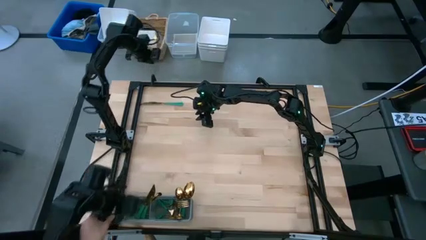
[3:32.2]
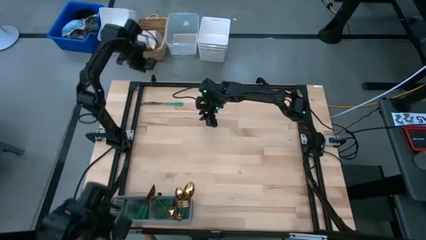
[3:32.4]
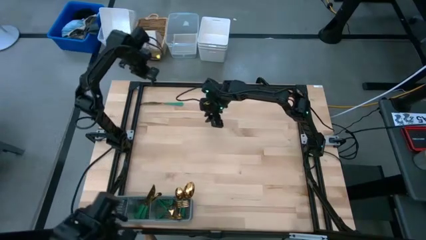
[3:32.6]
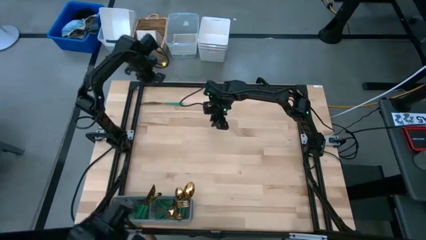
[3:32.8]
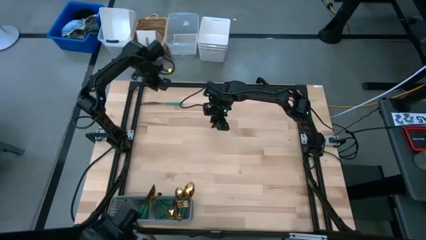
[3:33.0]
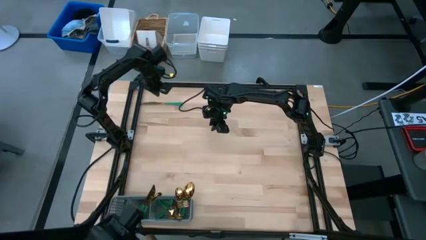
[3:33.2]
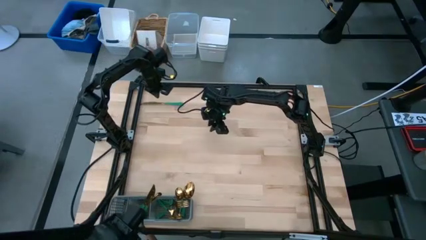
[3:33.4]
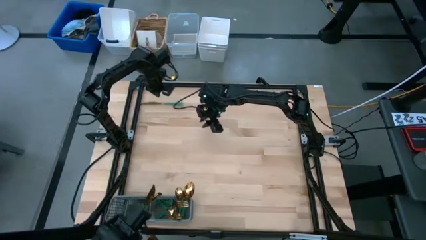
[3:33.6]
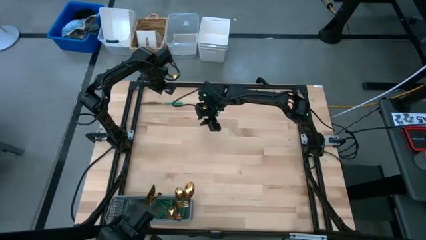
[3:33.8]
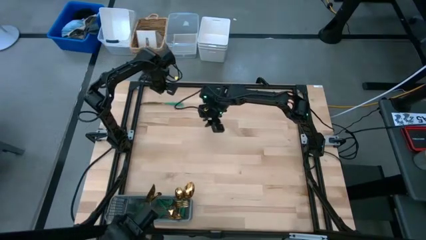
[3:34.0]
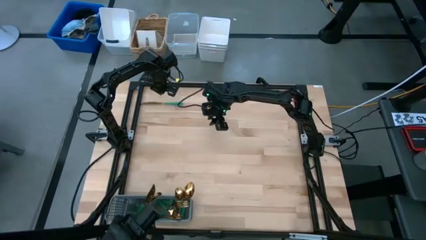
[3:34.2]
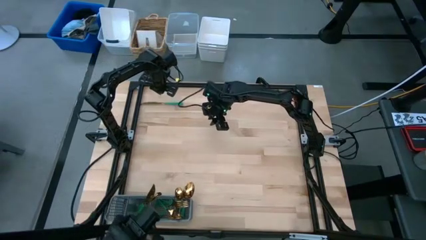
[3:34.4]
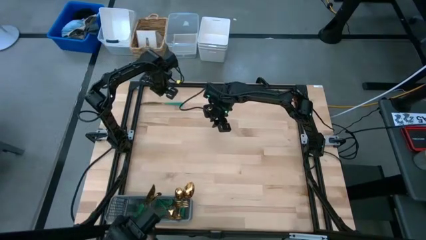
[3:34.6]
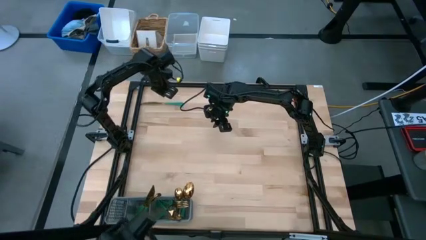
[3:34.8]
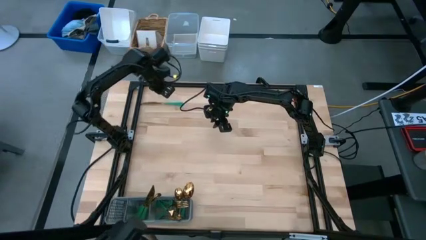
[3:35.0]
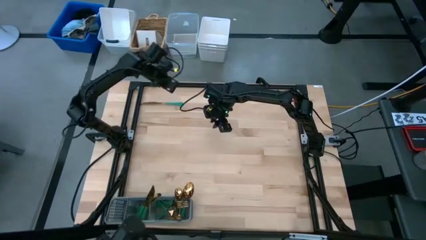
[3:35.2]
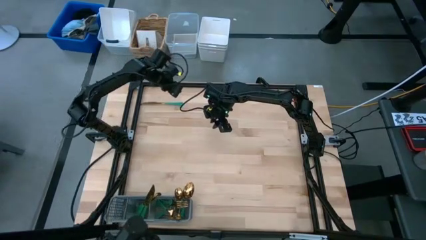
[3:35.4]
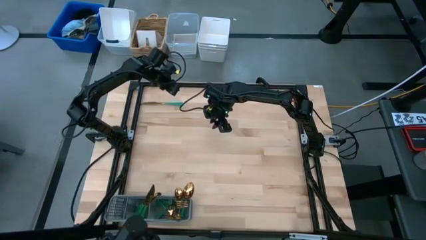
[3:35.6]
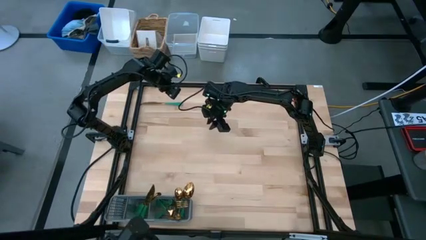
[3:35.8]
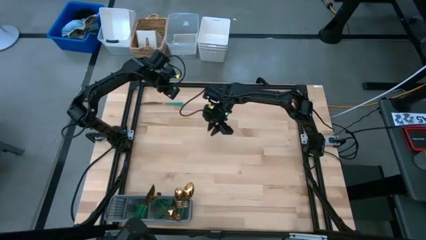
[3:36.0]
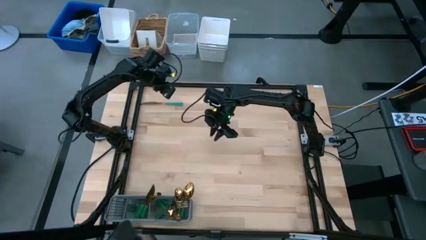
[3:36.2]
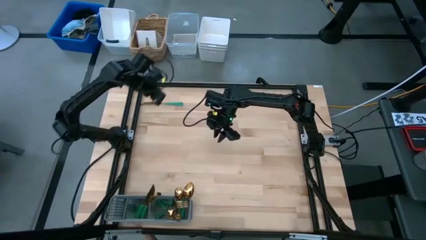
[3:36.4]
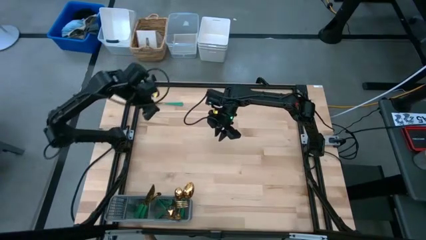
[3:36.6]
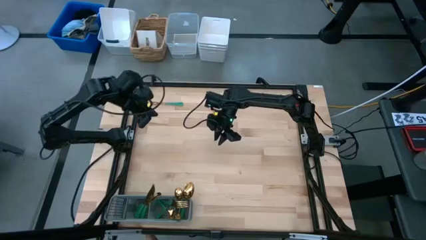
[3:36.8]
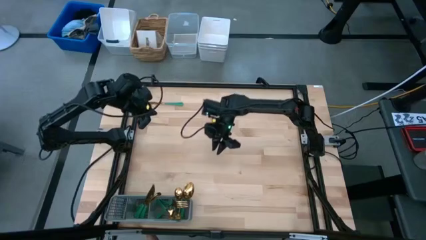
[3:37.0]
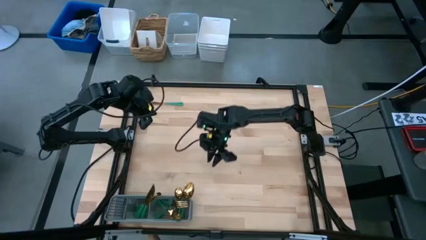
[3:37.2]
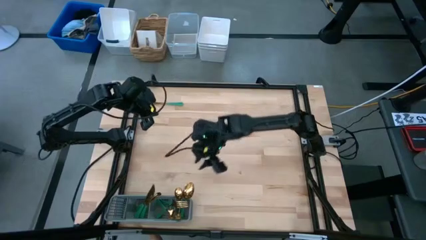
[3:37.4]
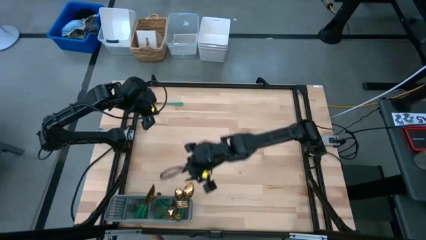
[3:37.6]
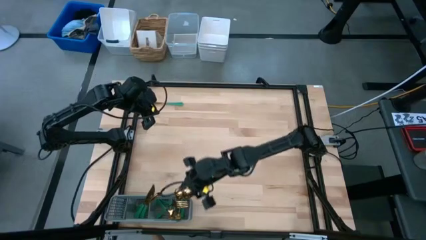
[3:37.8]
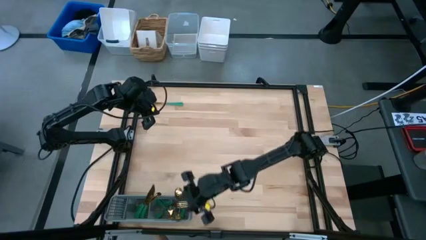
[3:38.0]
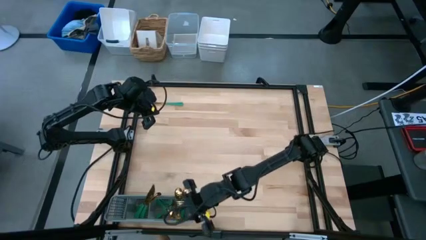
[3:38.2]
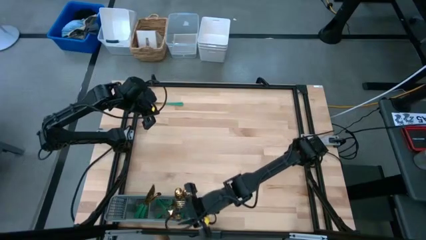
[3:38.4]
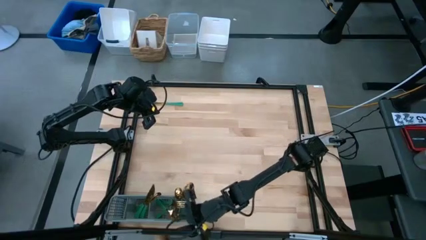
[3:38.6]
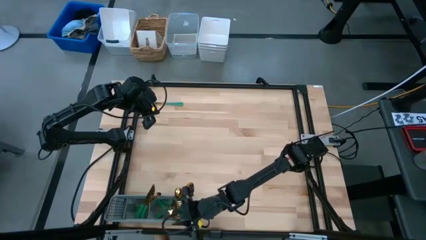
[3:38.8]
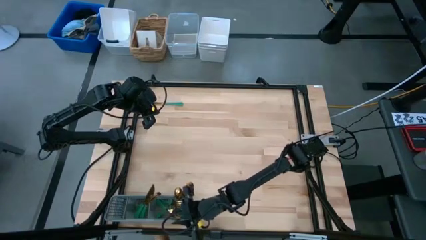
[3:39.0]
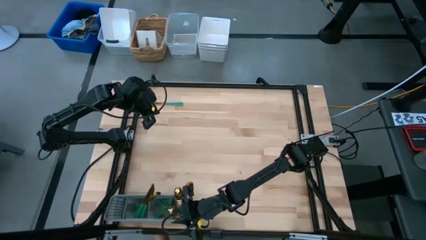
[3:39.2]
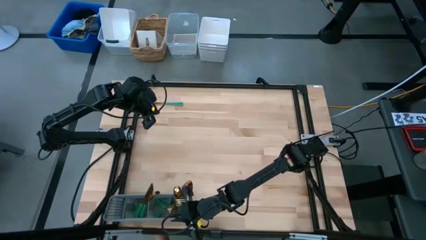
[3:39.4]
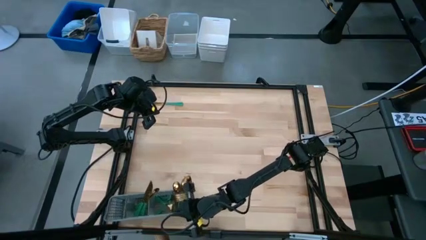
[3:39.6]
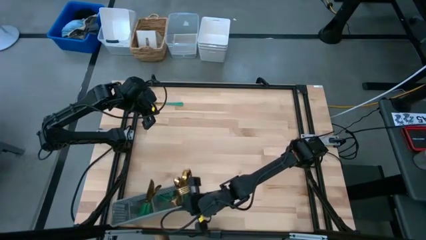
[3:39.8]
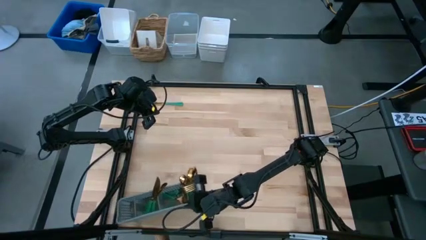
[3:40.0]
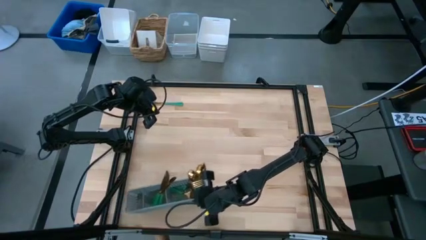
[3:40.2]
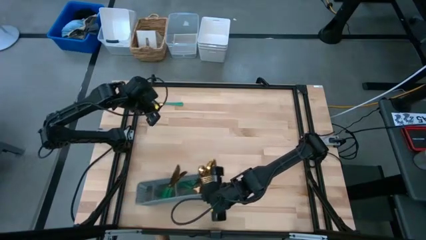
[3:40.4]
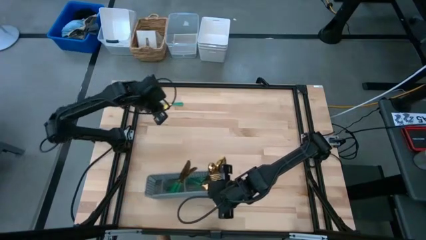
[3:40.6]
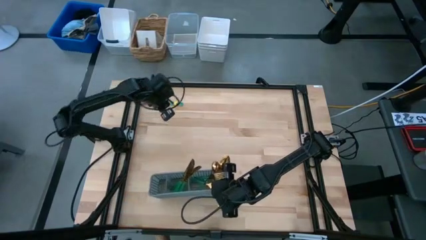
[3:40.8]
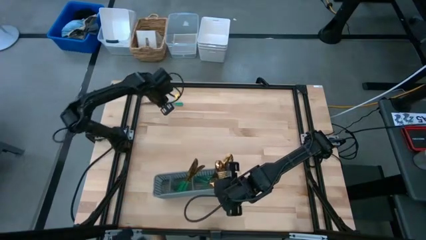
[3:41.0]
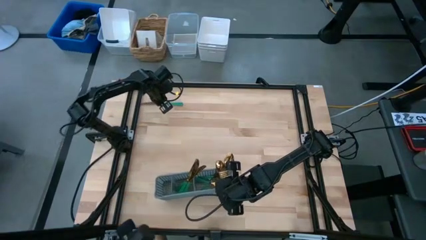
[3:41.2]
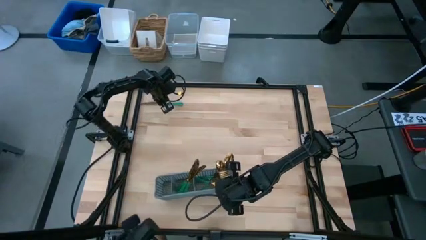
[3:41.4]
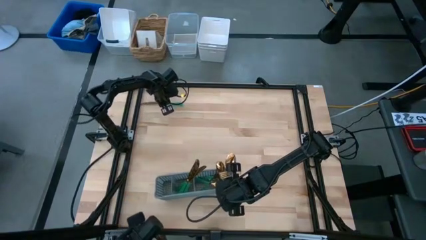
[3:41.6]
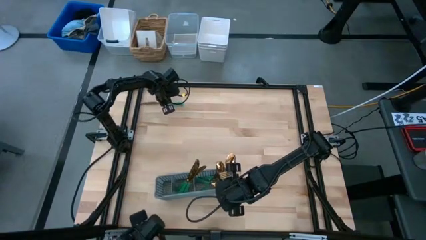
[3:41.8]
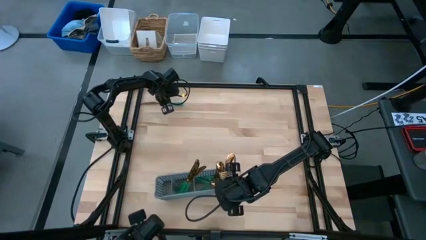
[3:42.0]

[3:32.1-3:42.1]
Task: Sort silverware
Move the cutlery rack to the center of the table
